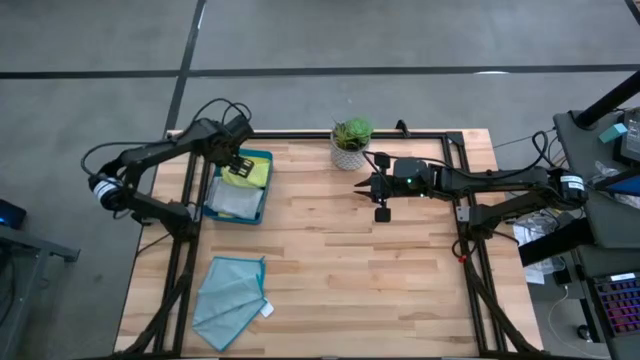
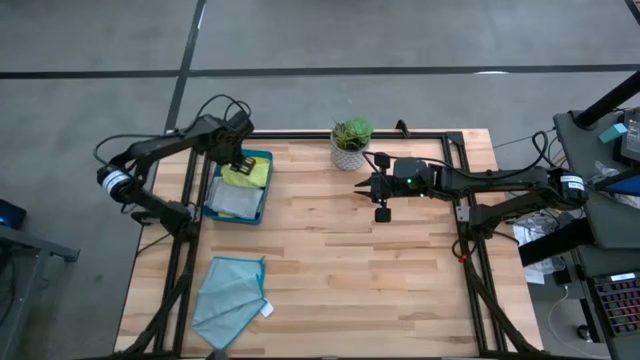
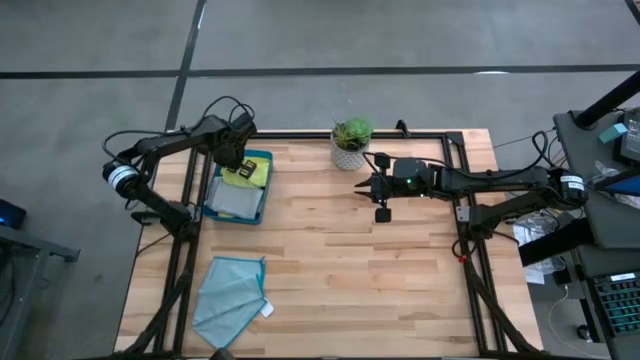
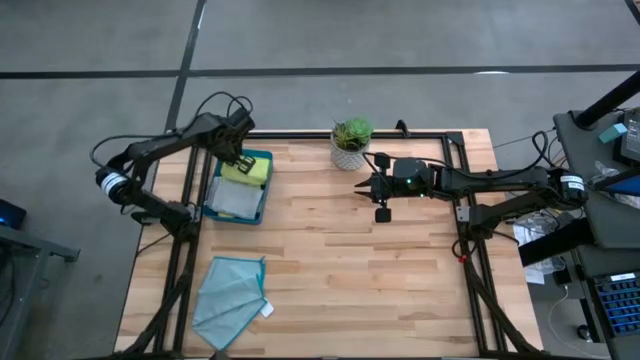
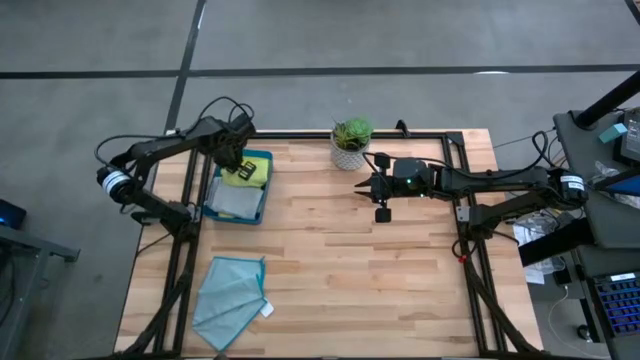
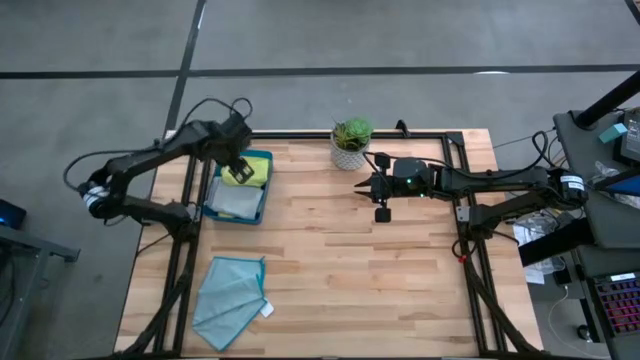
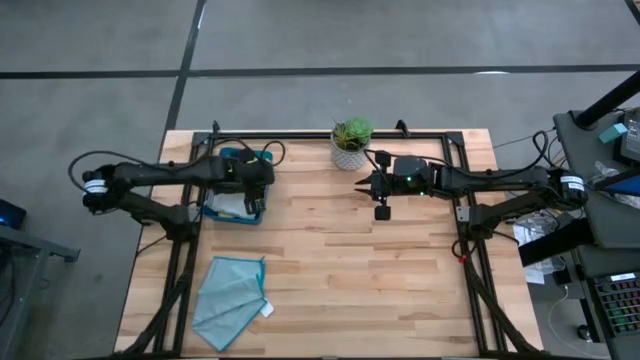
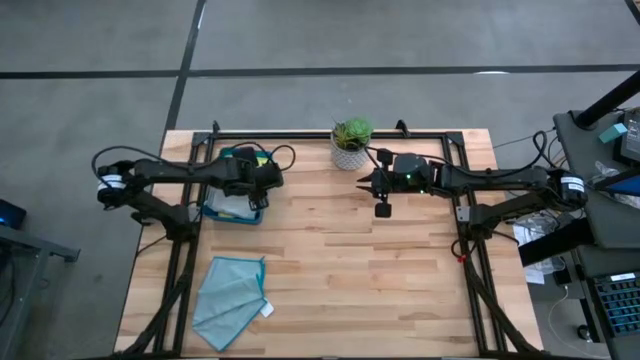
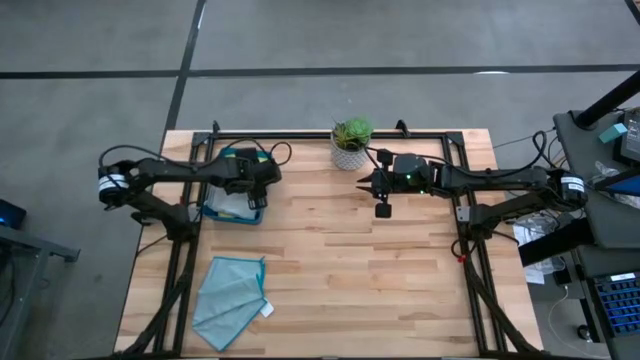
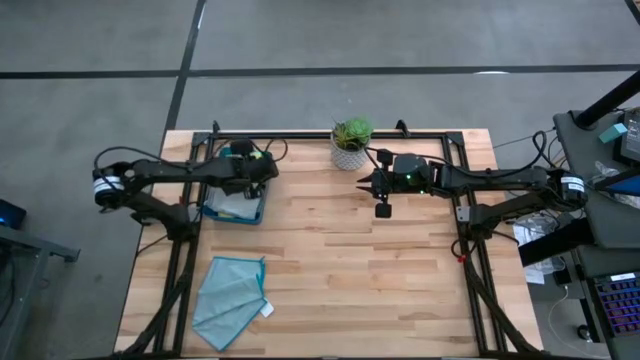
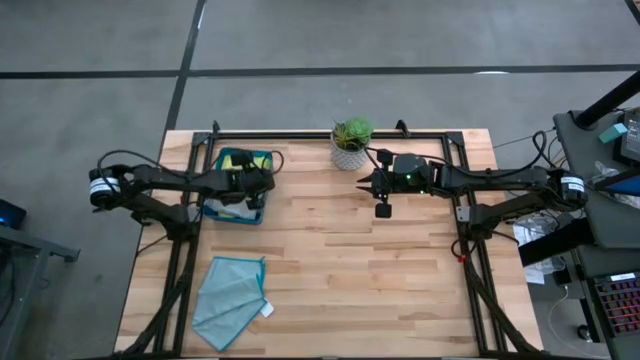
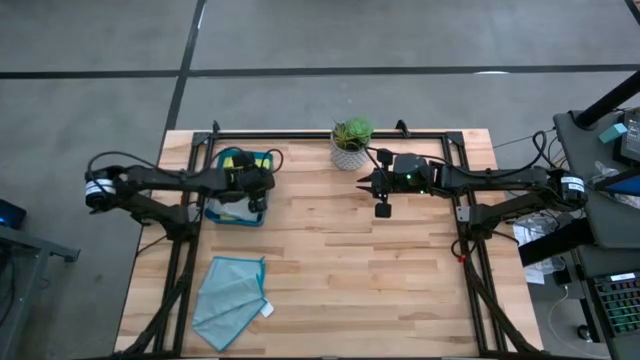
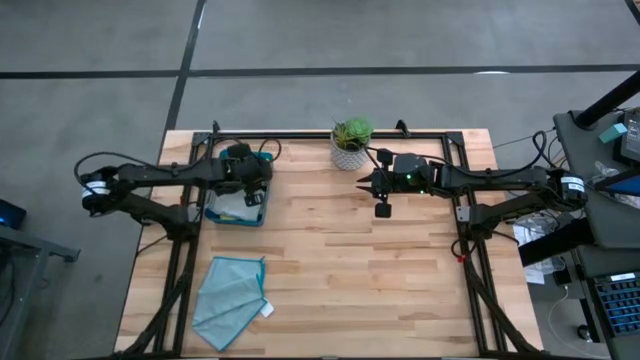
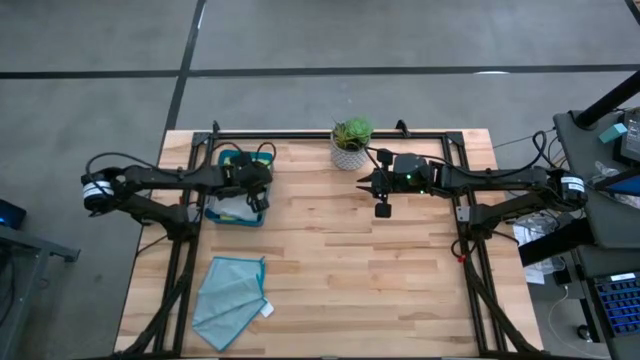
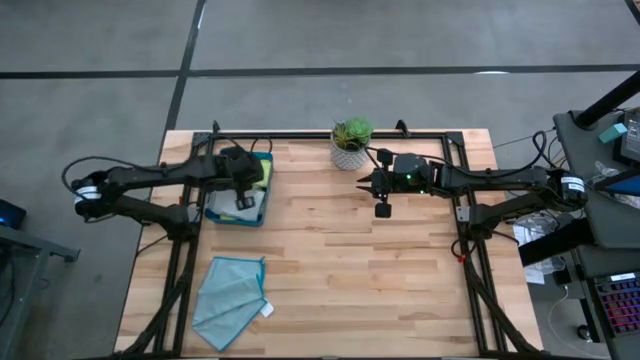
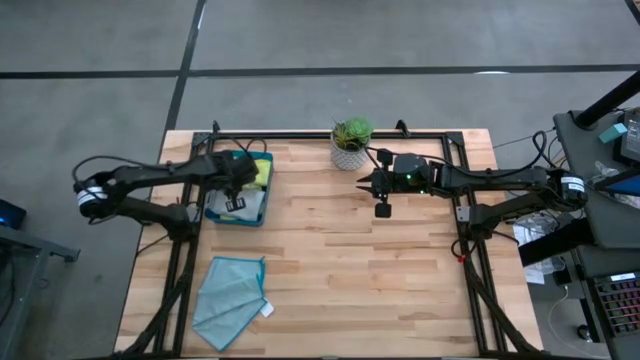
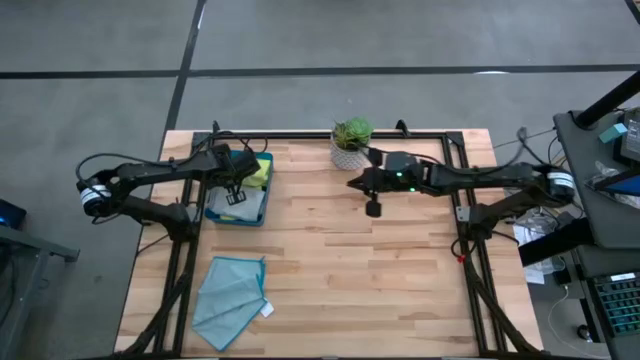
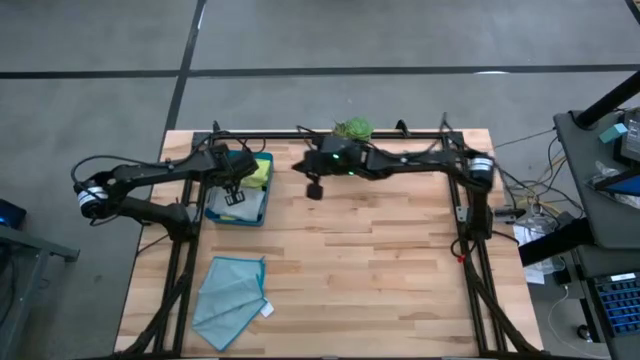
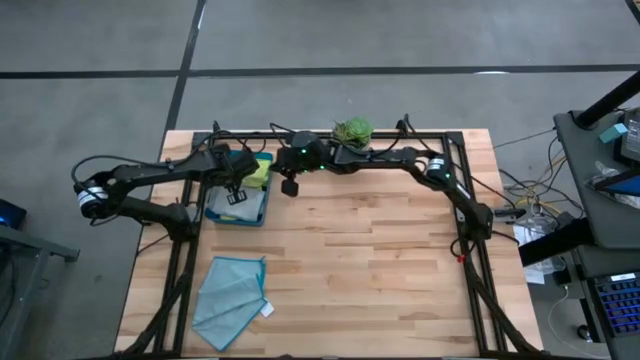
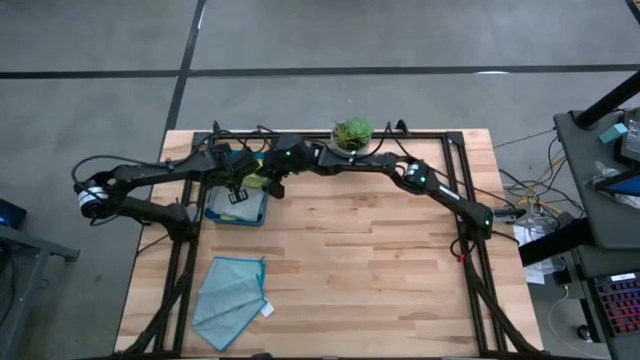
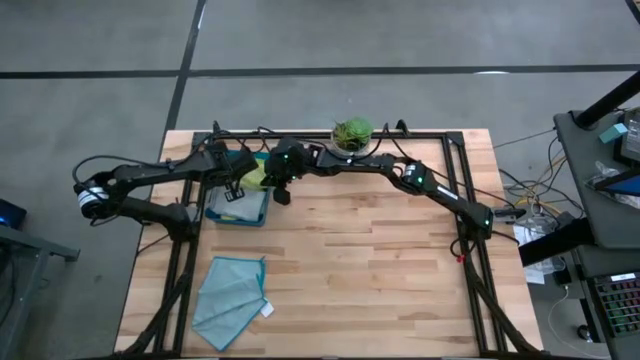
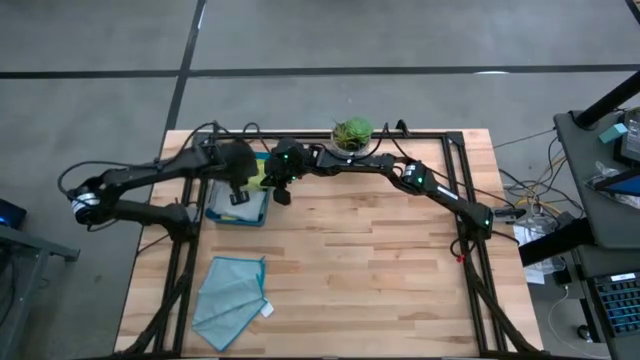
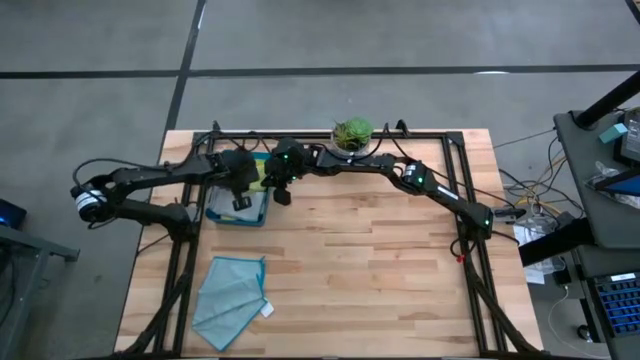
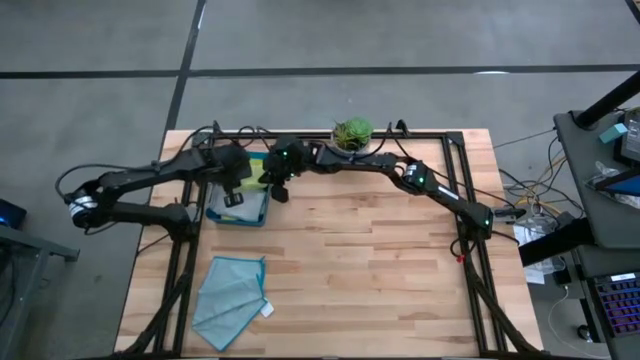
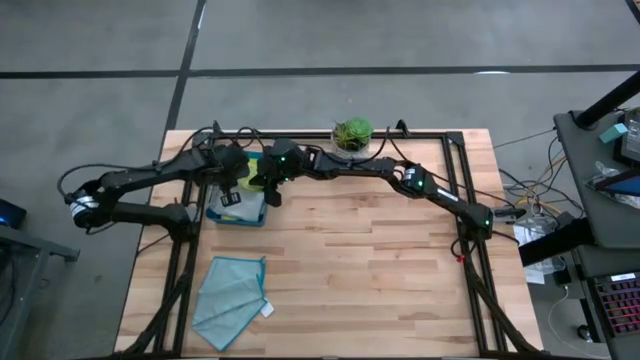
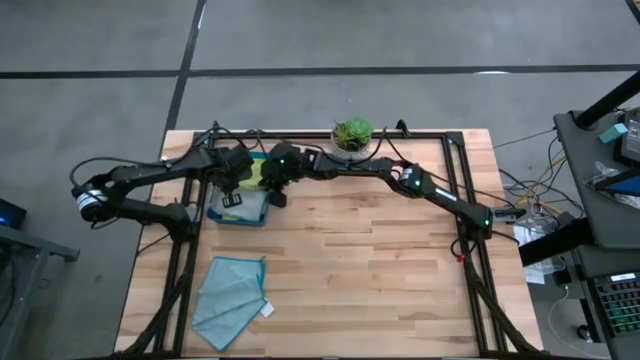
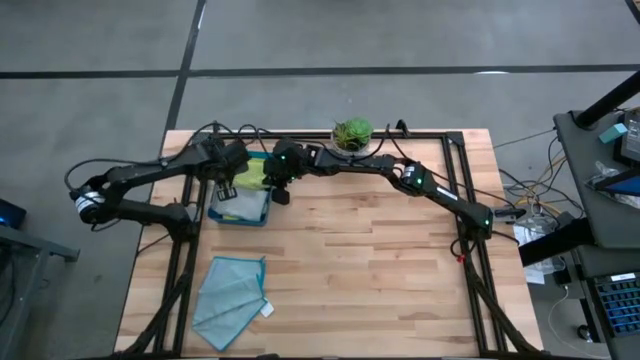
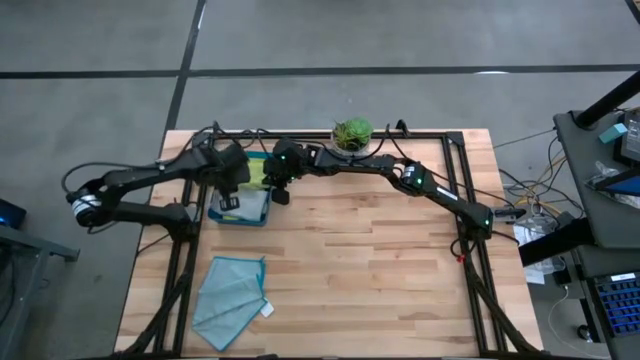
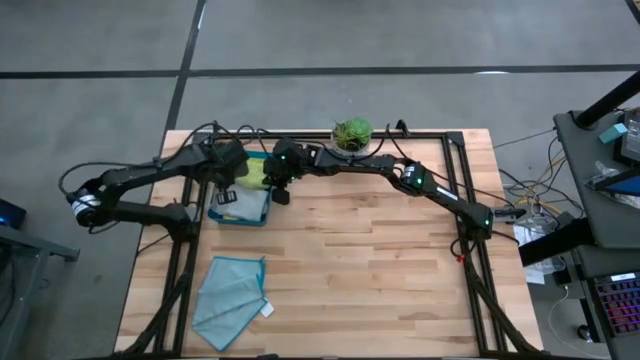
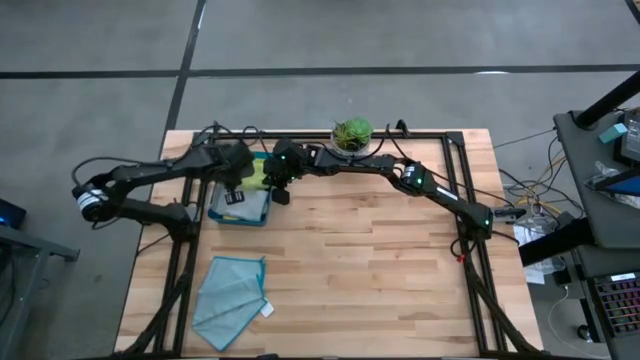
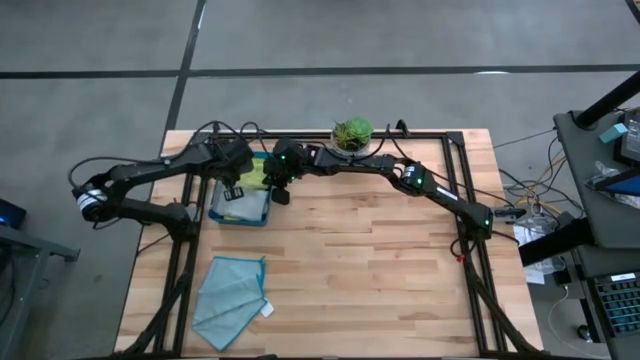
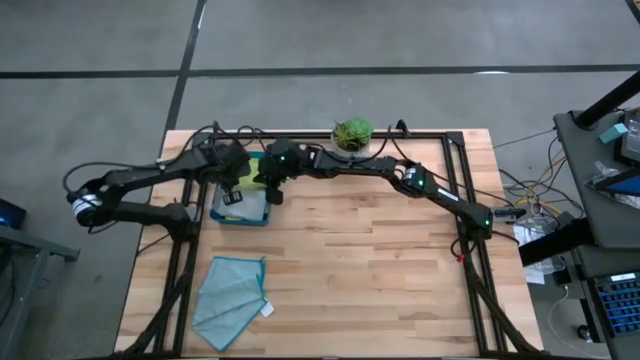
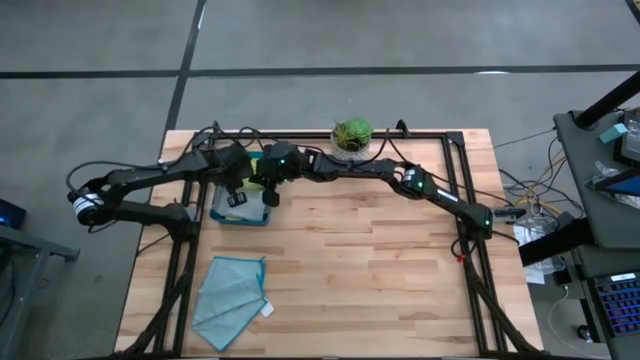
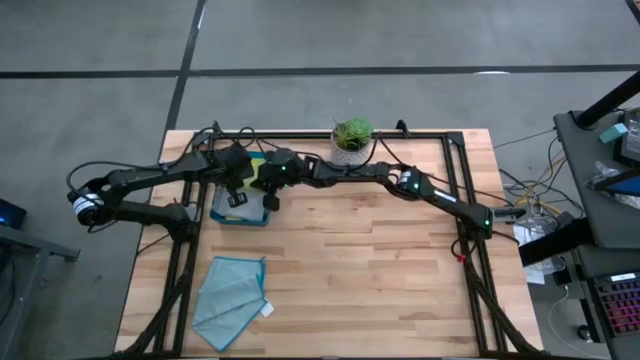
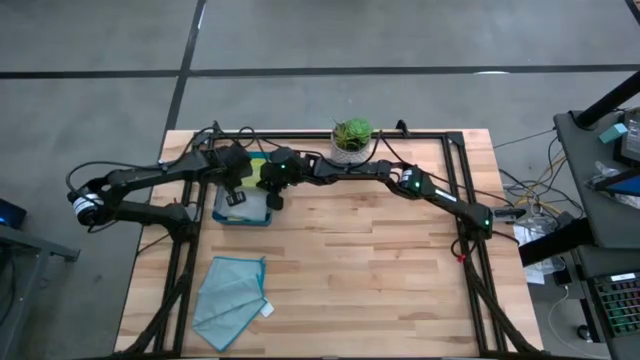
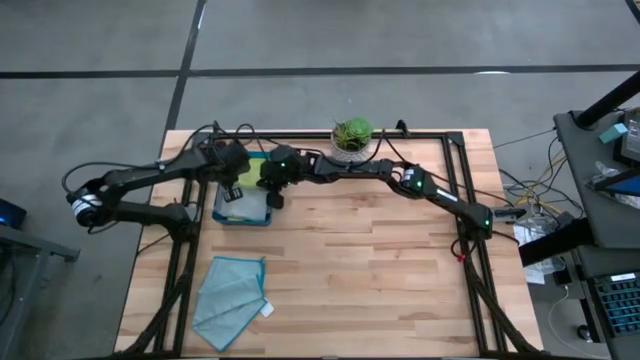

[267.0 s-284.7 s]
Task: Fold microfiber towels
Put the folded green towel into the blue bin

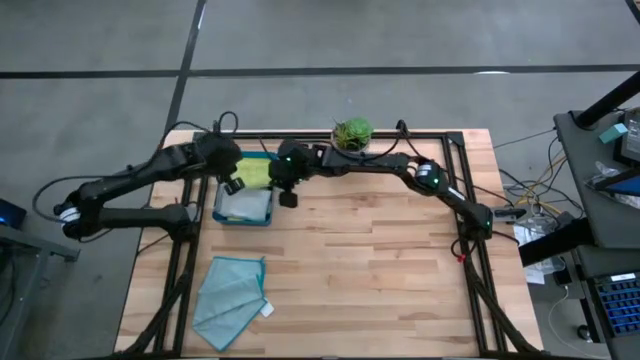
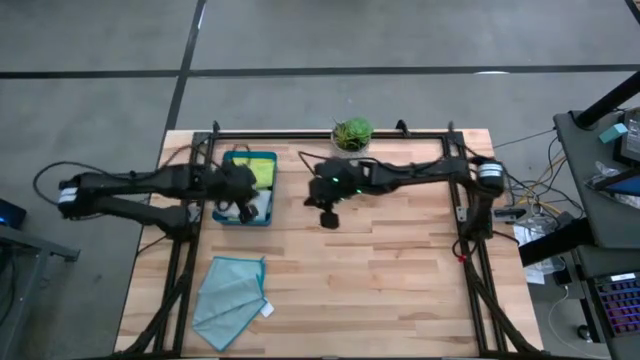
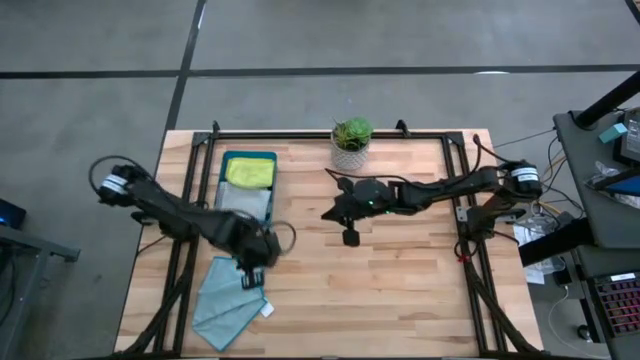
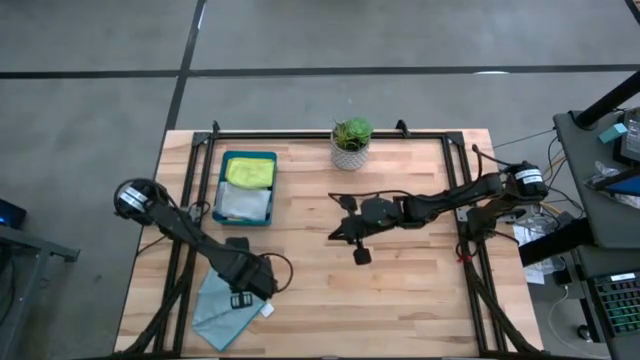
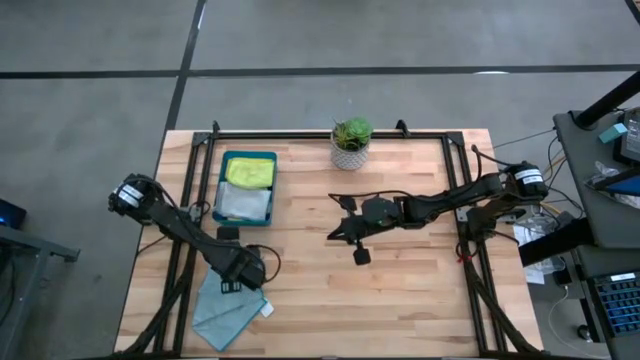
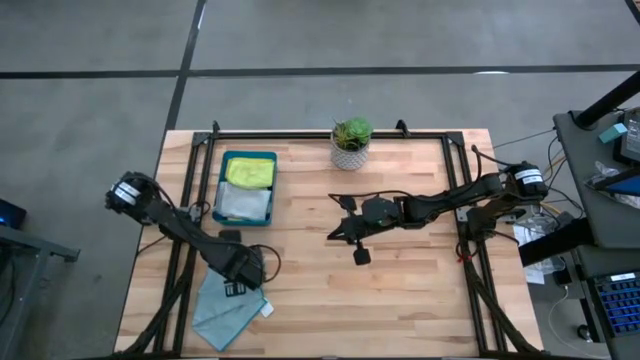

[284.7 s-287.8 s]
Fold the blue towel

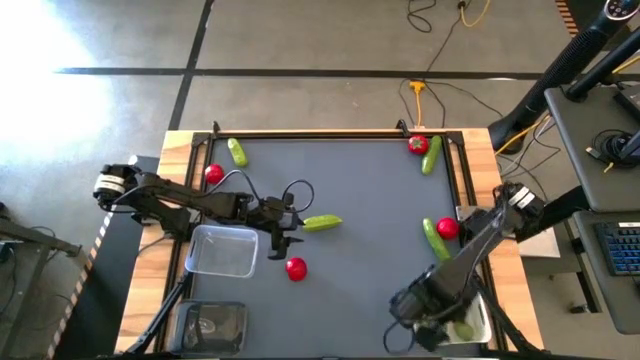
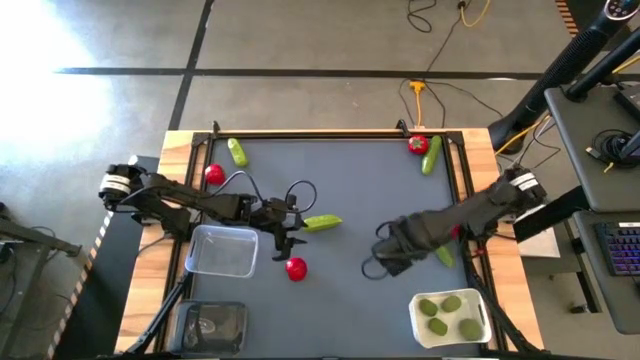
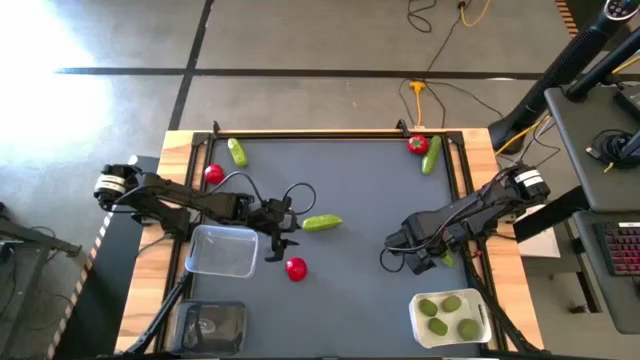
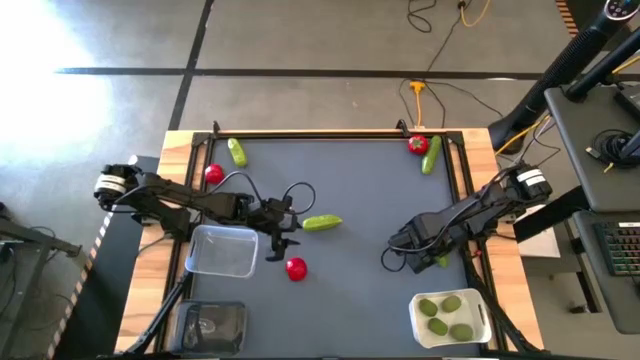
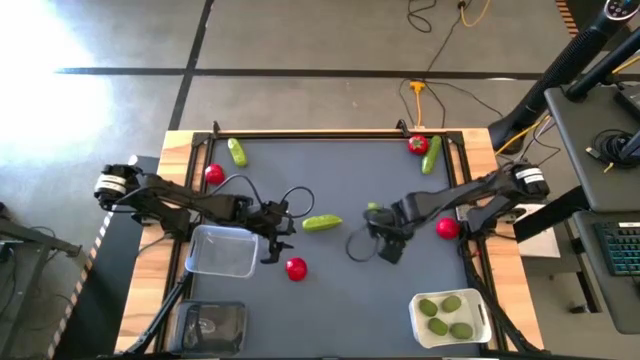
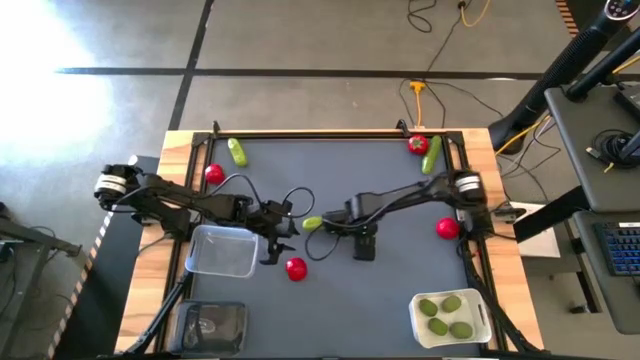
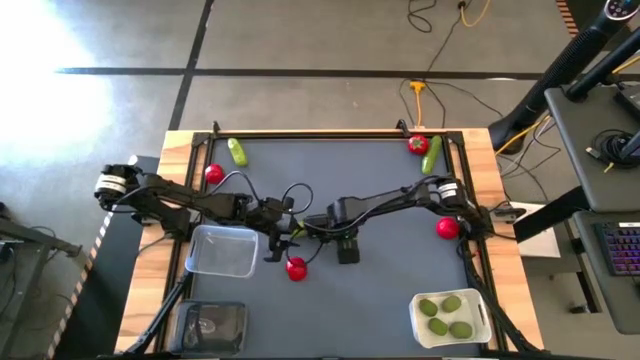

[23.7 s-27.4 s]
Task: Sort produce into baskets
Move the bottom right cucumber to the middle of the table
